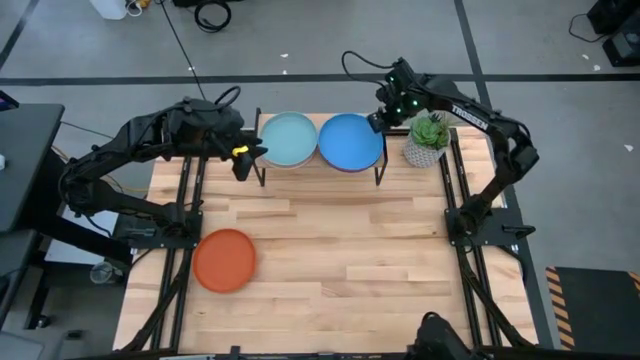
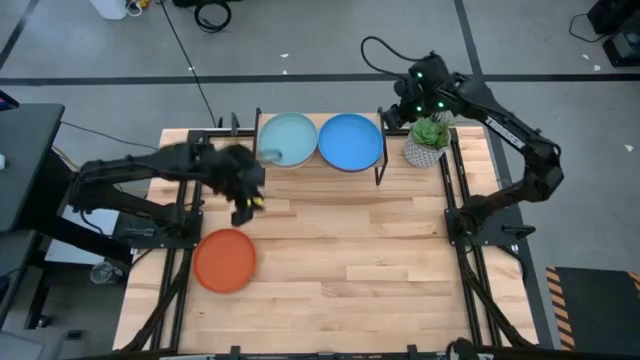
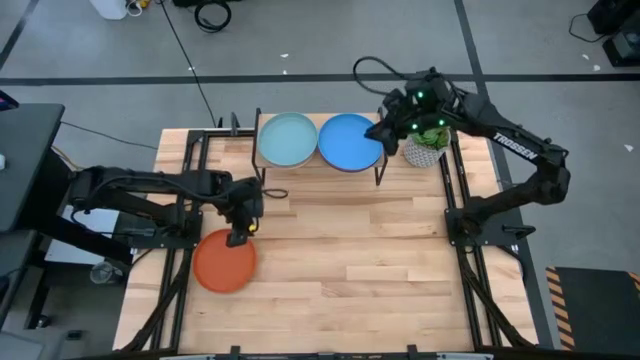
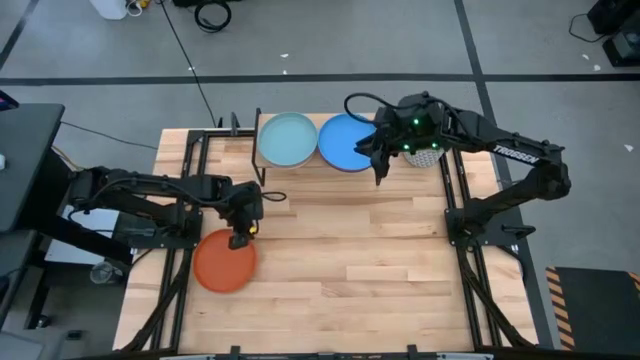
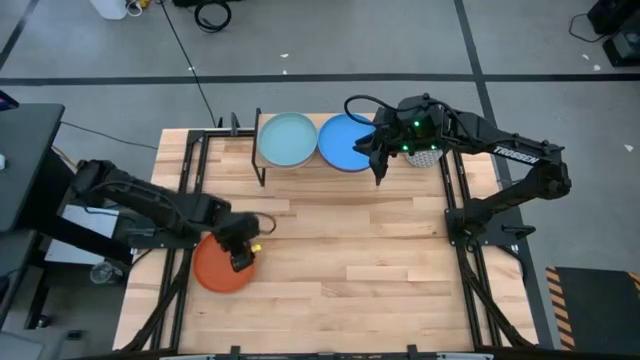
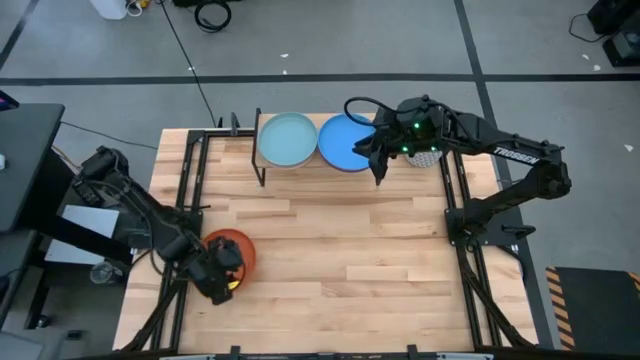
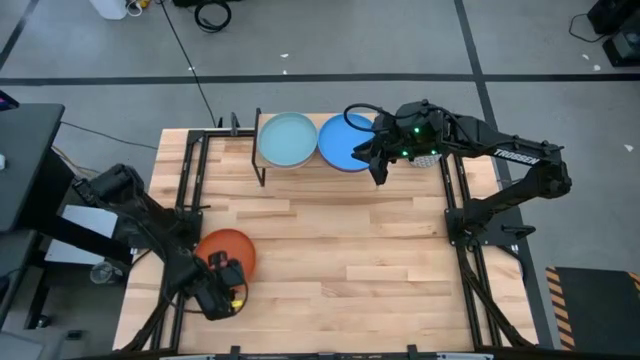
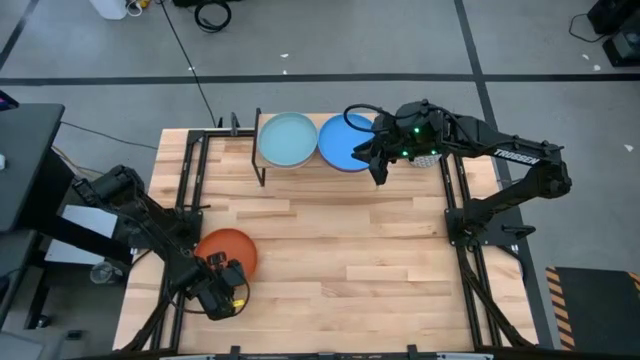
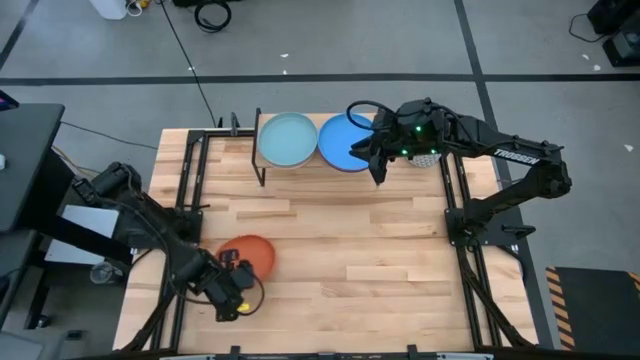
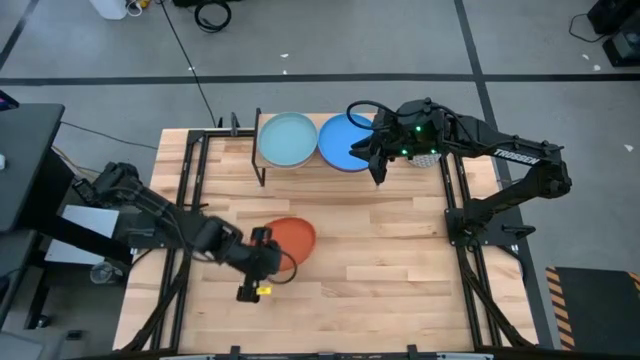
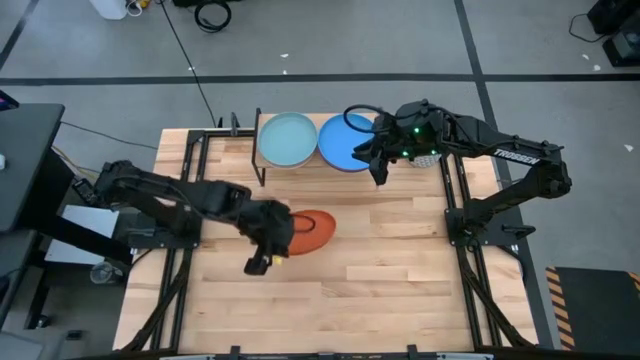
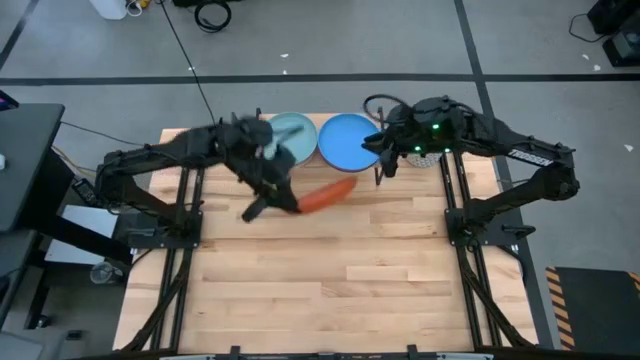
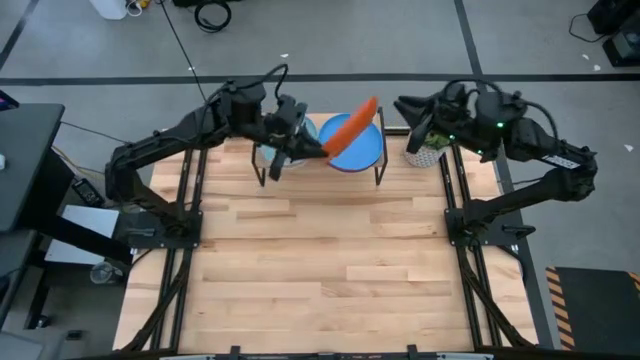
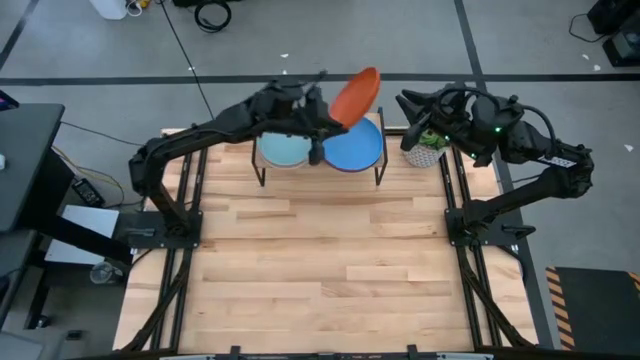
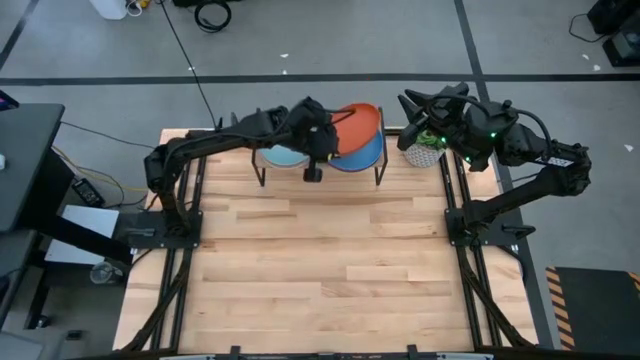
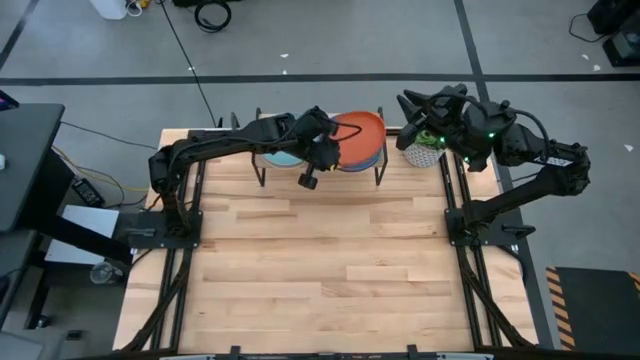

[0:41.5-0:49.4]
Task: Place and stack plates onto a shelf
Stack the orange plate on top of the blue plate on the shelf

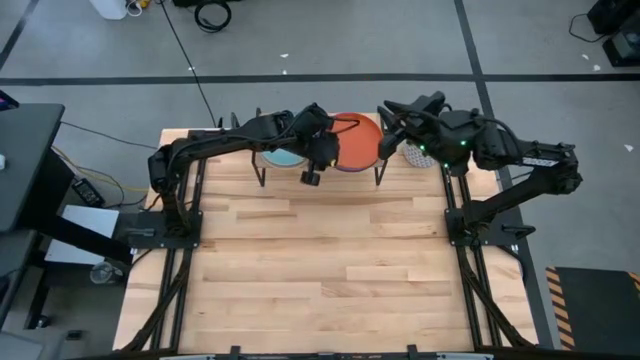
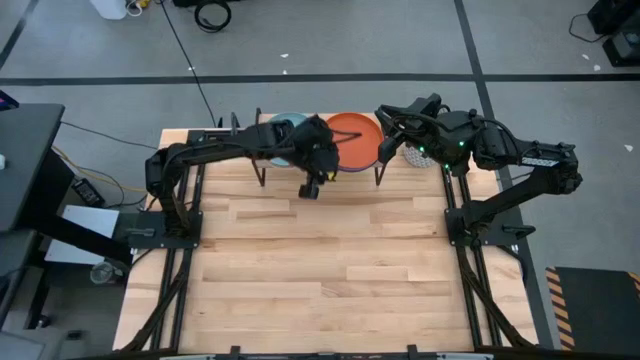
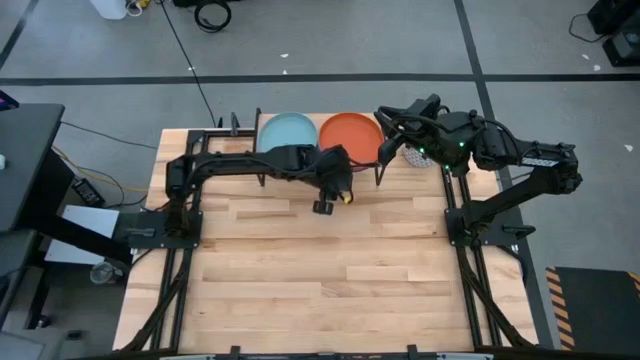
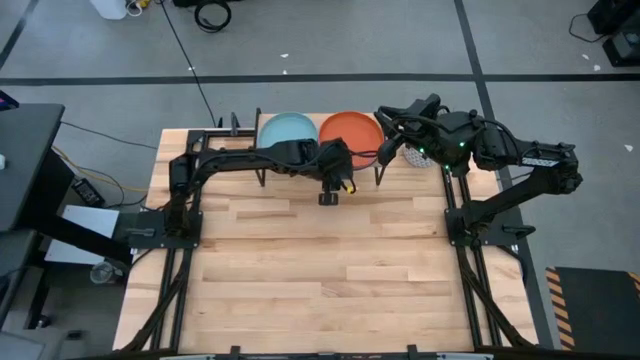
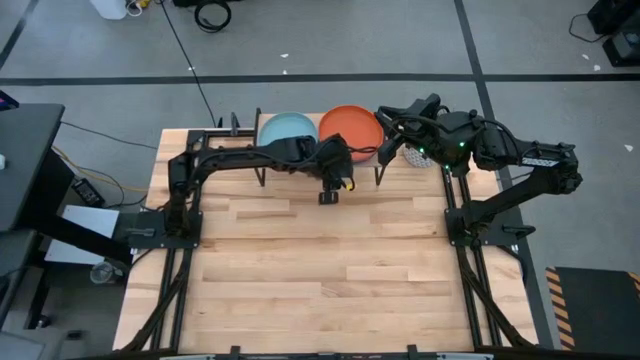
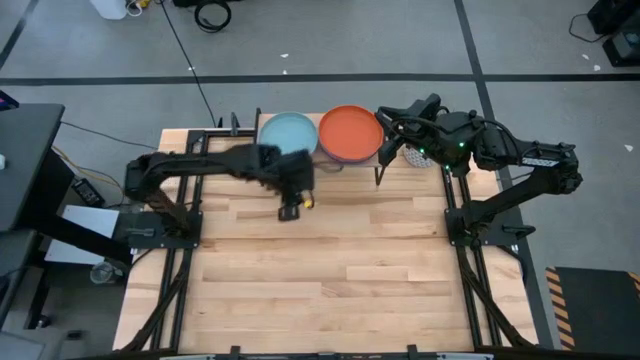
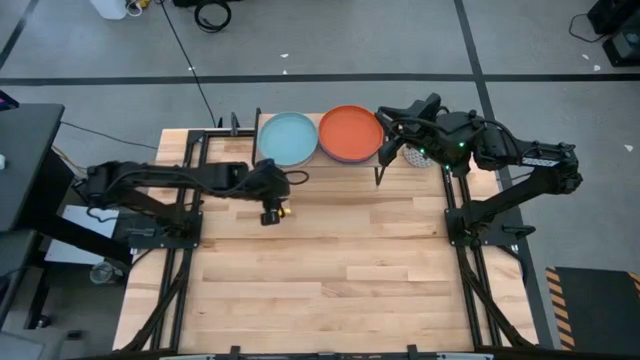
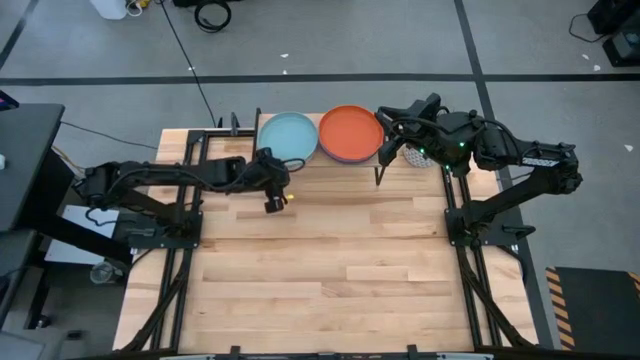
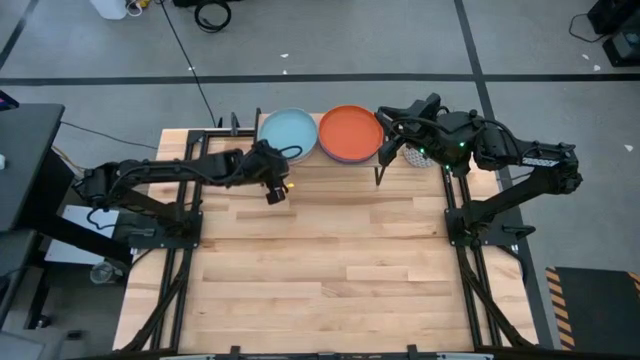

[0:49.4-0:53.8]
Adjust the plates on the shelf

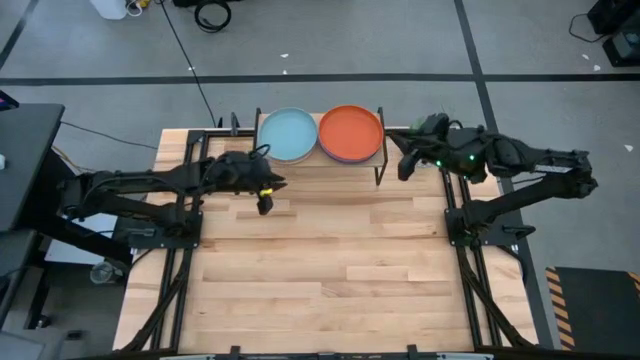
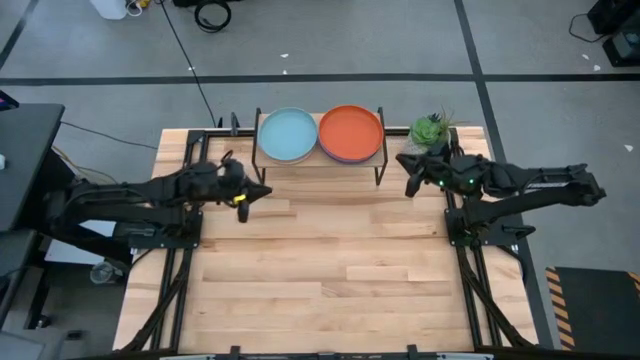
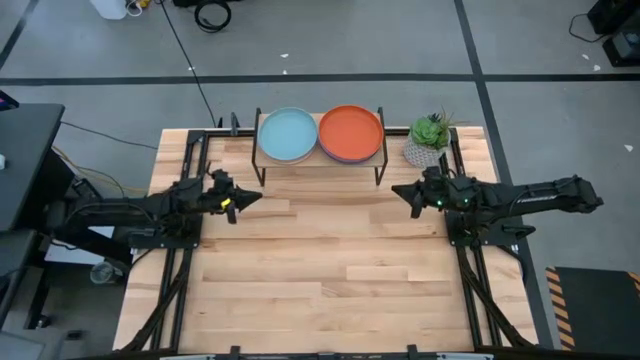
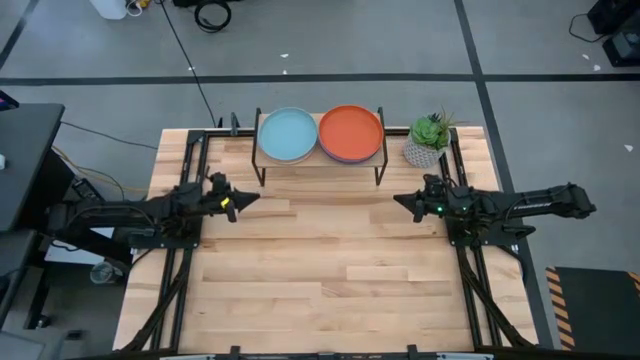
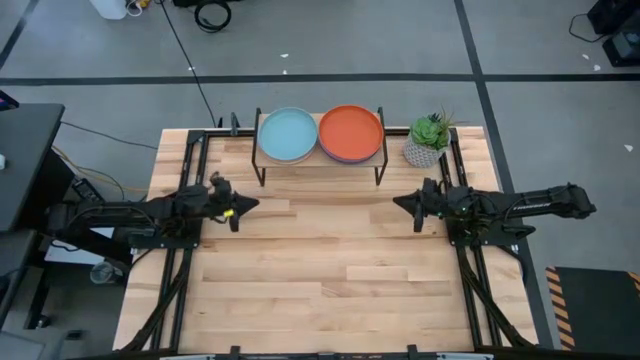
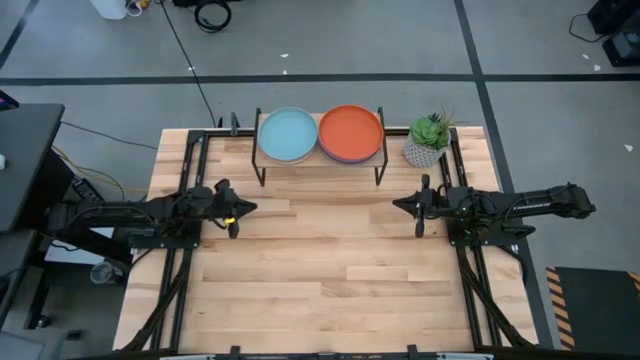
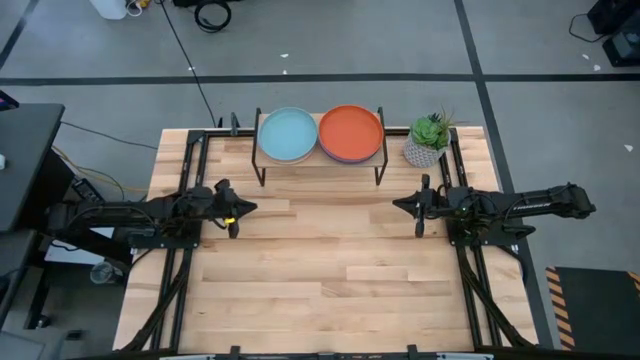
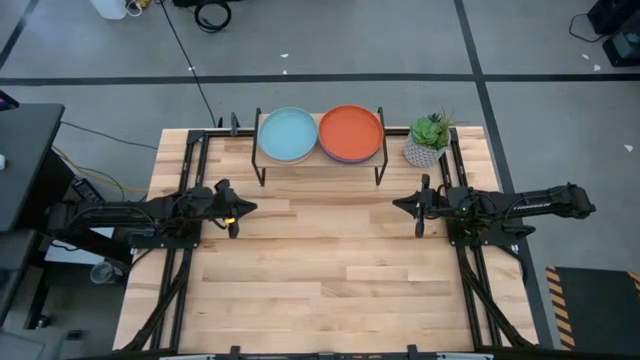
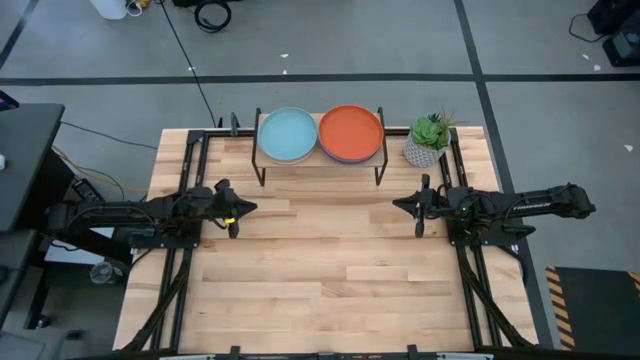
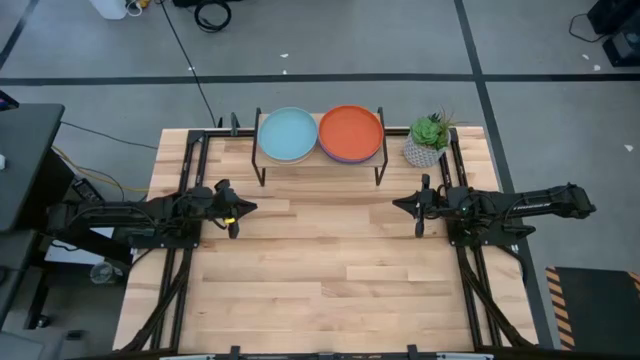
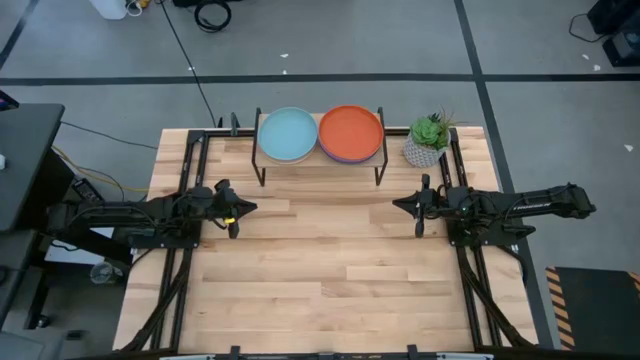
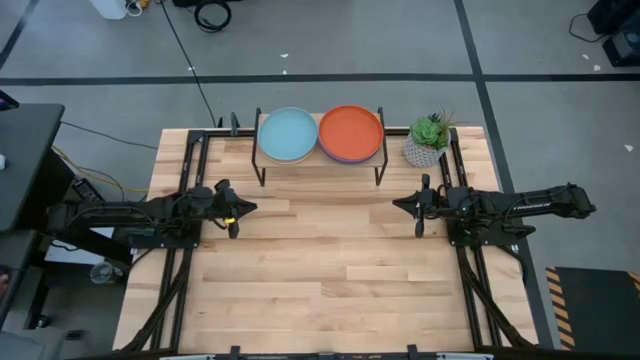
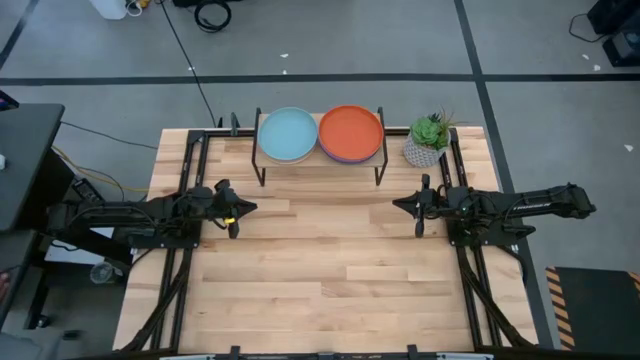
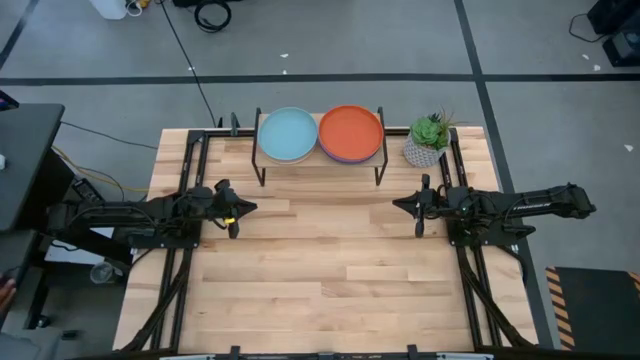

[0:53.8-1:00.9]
Return to Home Position

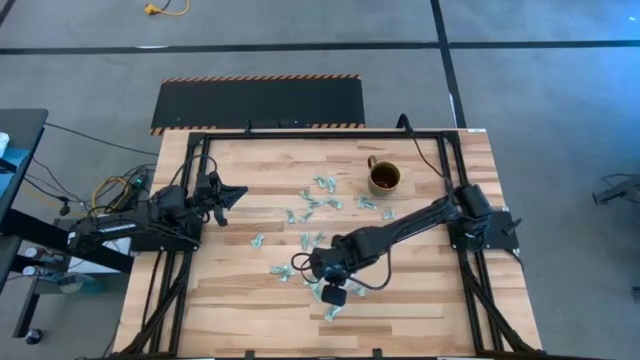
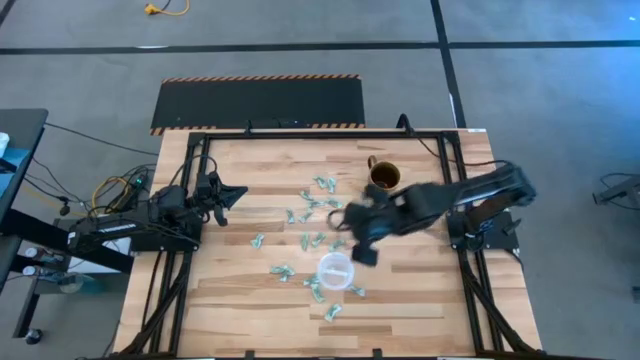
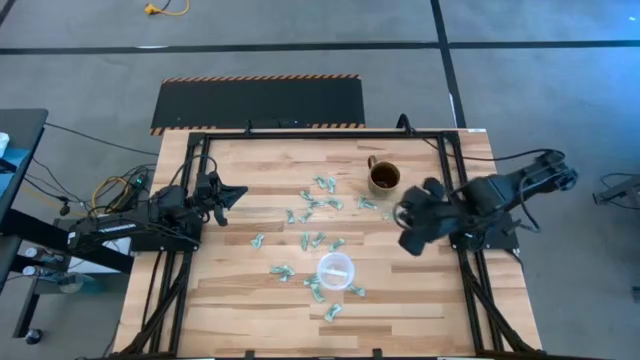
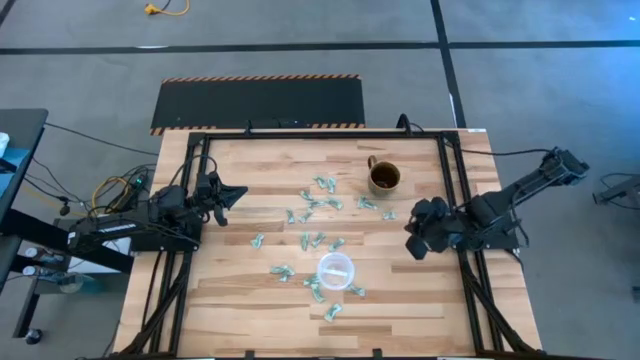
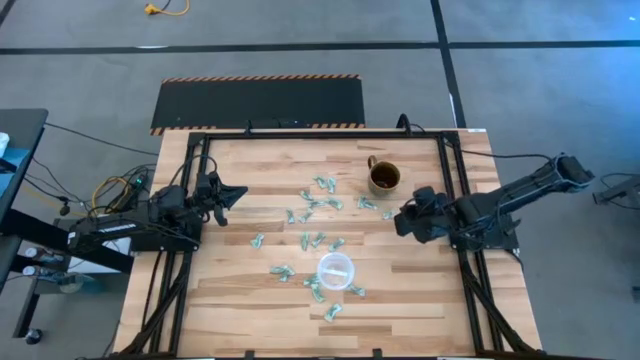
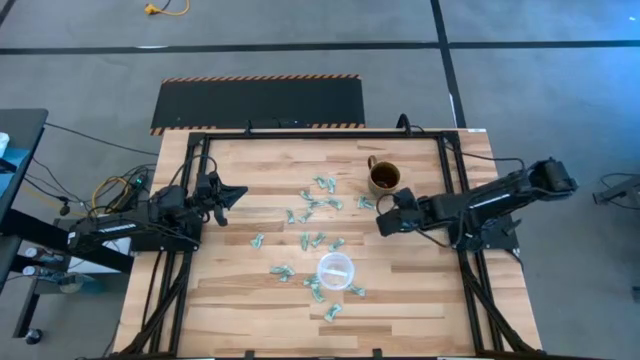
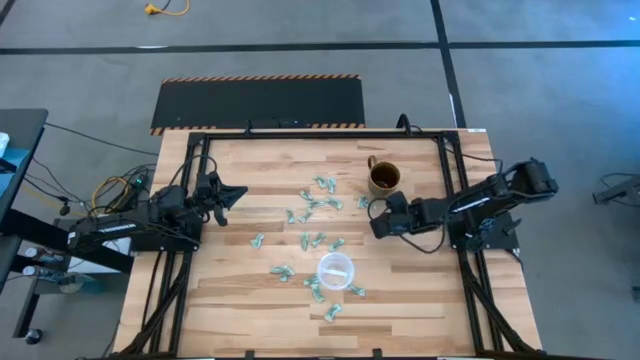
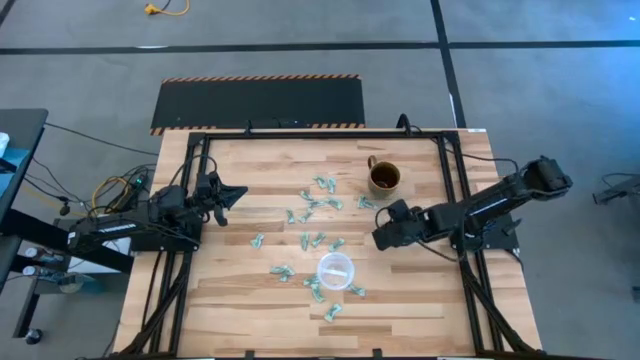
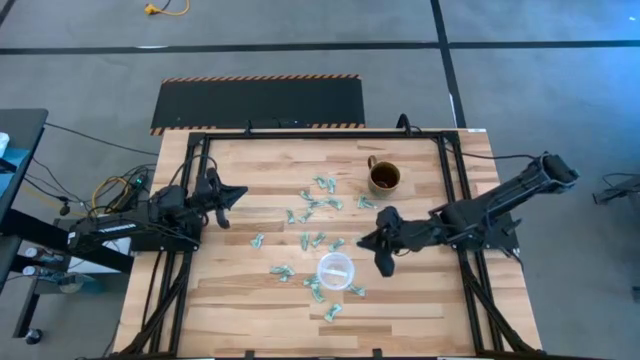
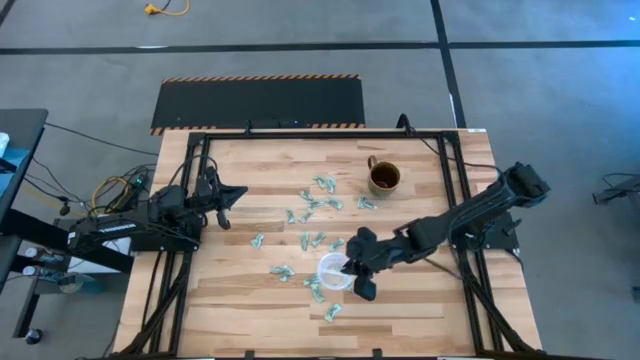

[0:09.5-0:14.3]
Task: Pick and place Stevia / Truvia into bins
Put the green stevia packet into the transparent container
